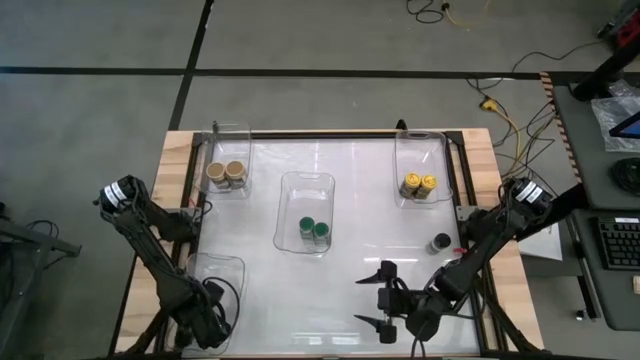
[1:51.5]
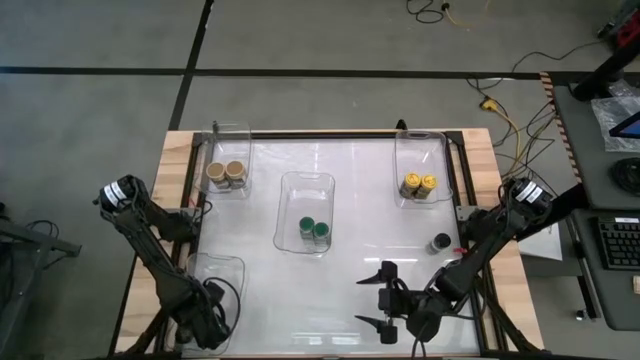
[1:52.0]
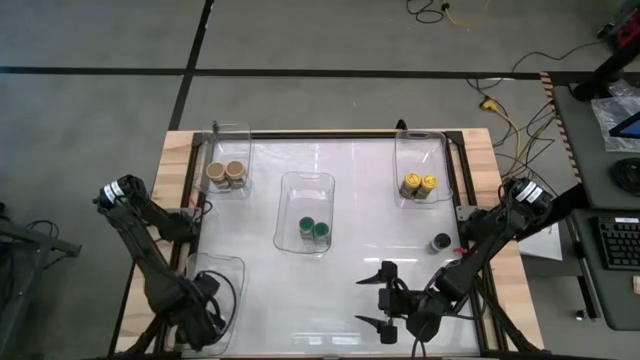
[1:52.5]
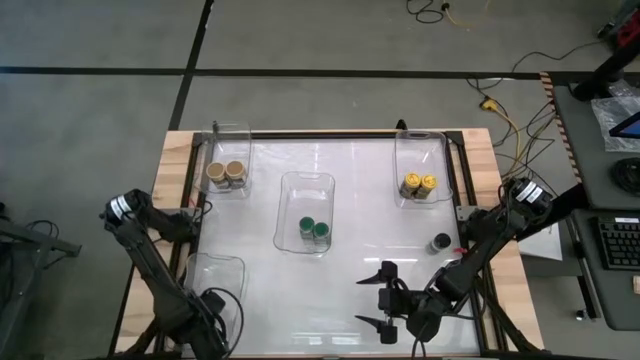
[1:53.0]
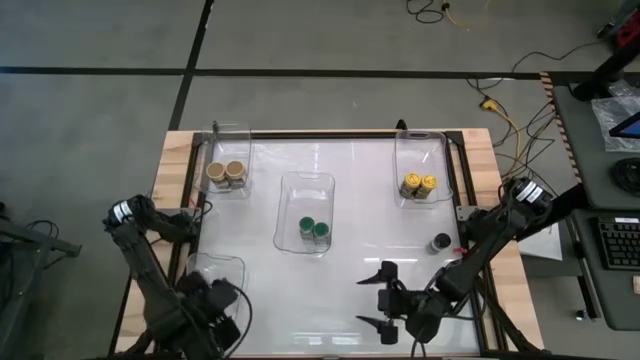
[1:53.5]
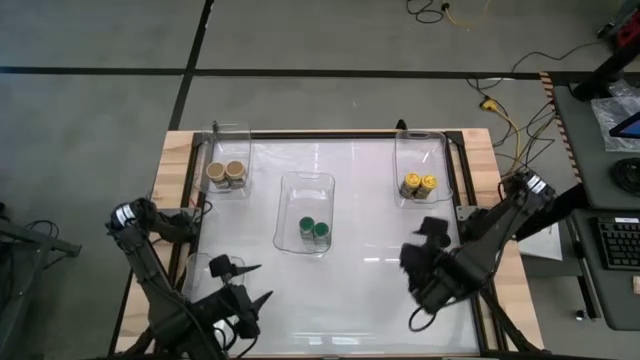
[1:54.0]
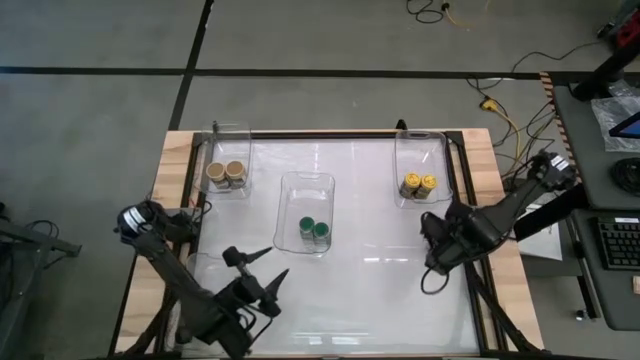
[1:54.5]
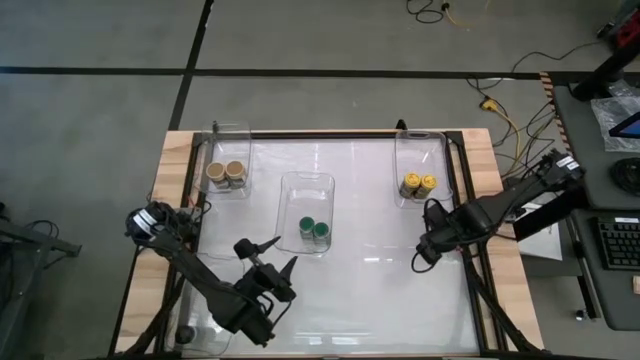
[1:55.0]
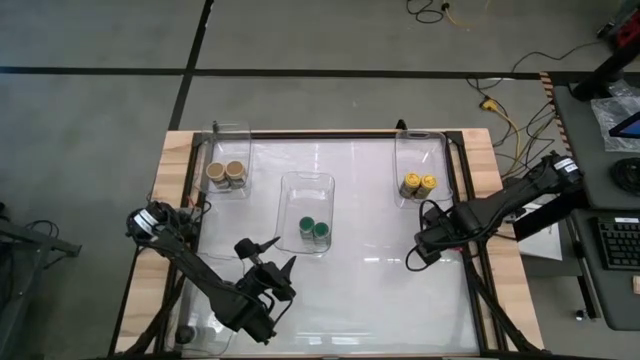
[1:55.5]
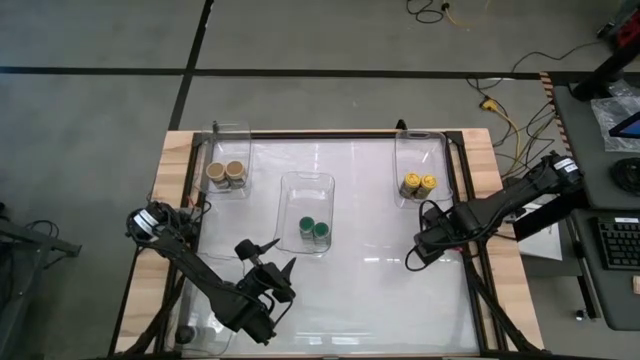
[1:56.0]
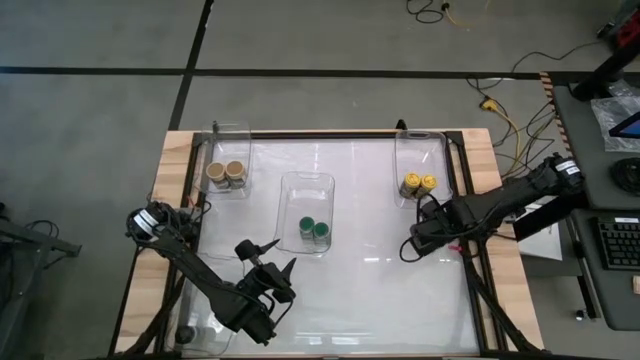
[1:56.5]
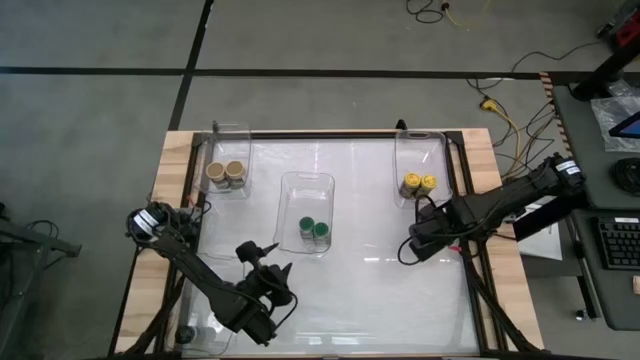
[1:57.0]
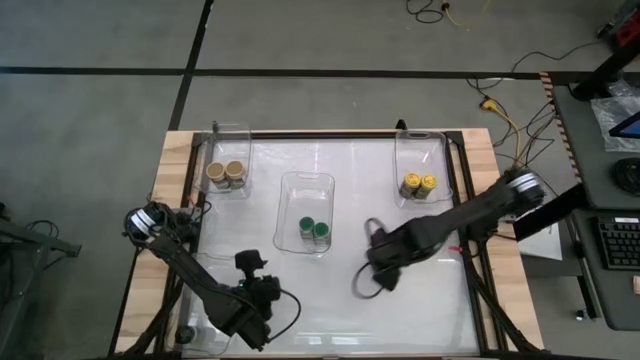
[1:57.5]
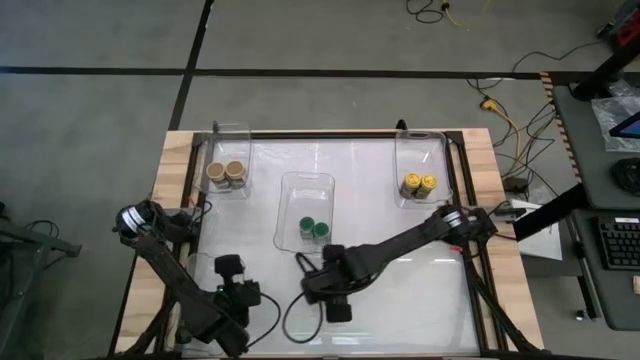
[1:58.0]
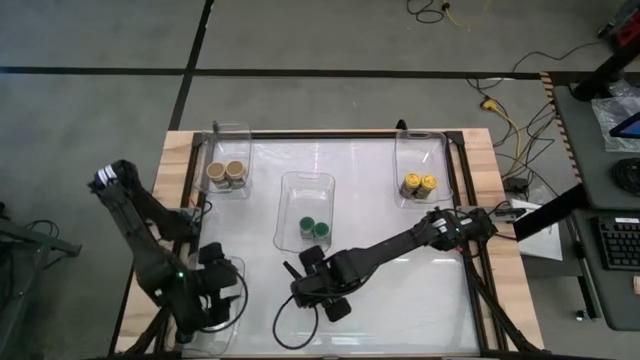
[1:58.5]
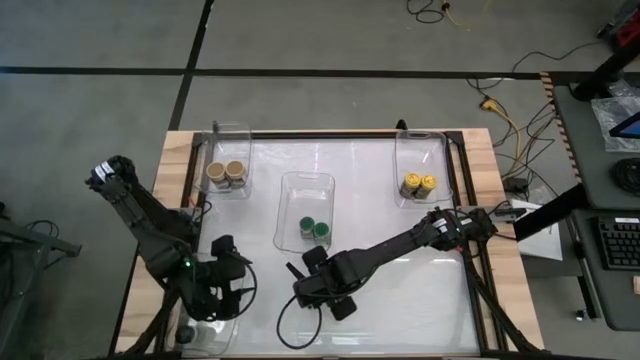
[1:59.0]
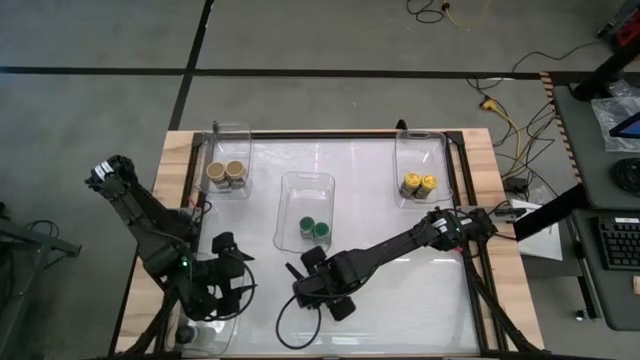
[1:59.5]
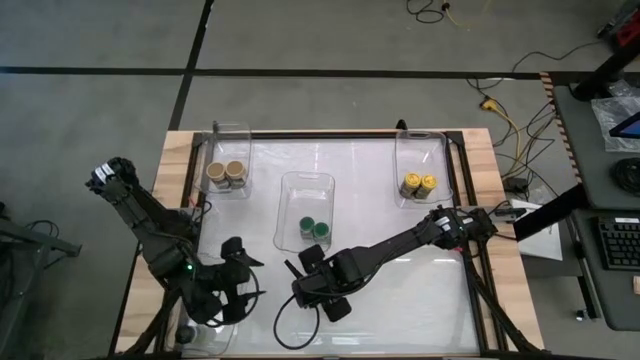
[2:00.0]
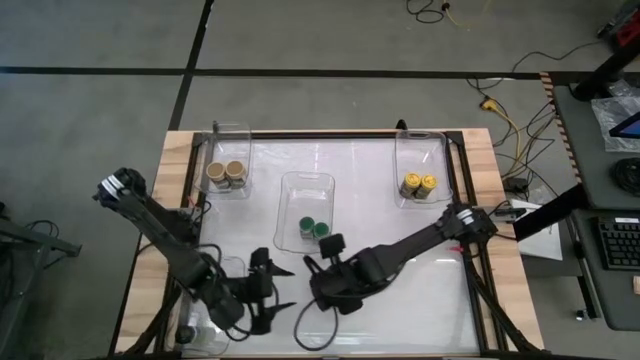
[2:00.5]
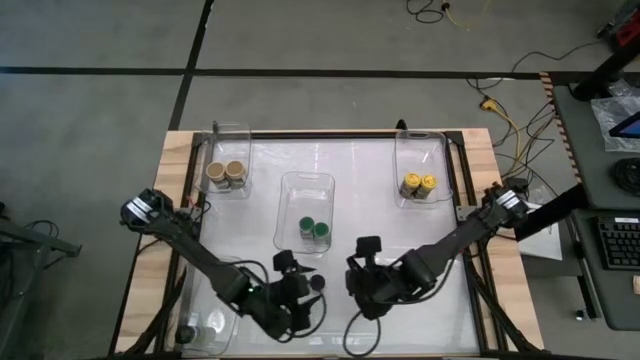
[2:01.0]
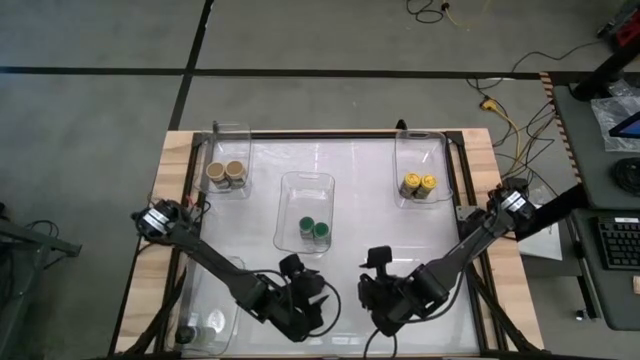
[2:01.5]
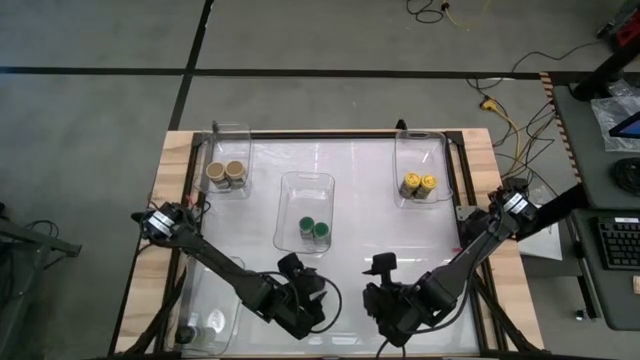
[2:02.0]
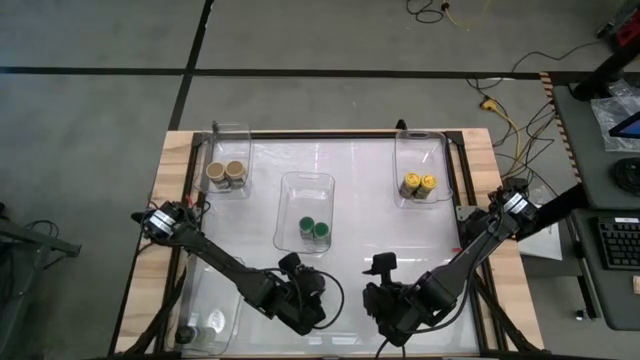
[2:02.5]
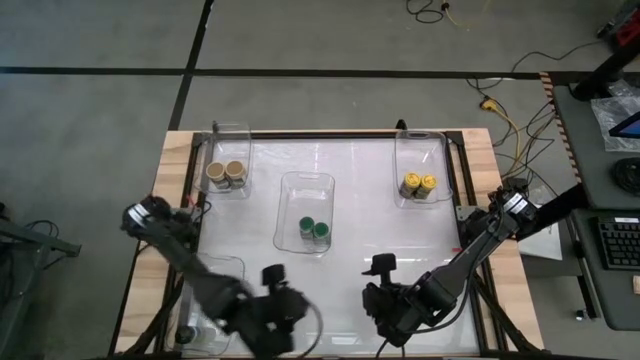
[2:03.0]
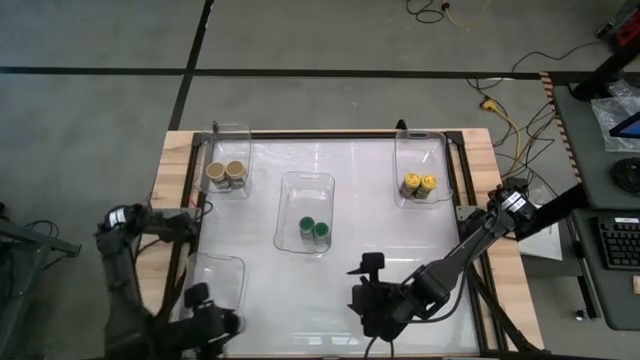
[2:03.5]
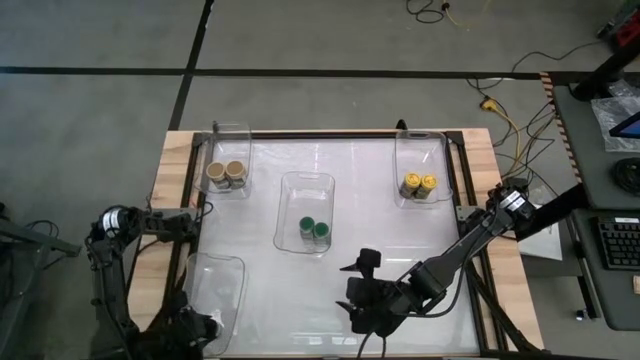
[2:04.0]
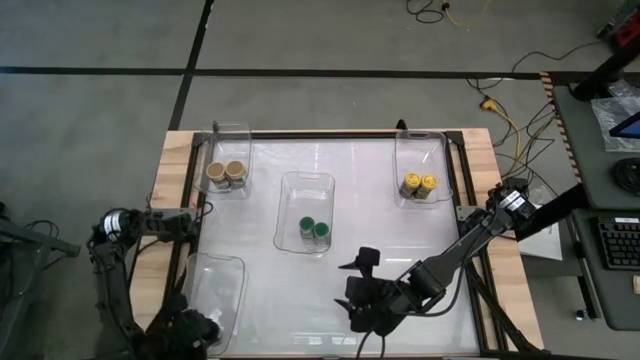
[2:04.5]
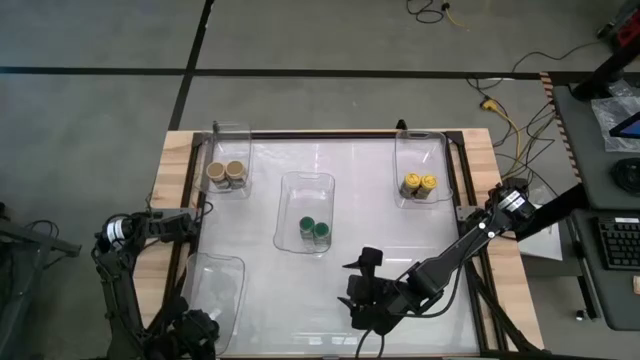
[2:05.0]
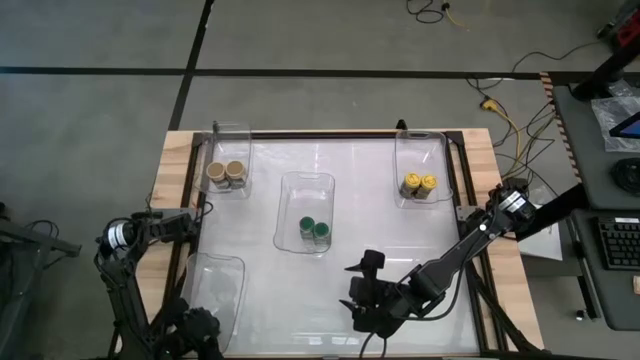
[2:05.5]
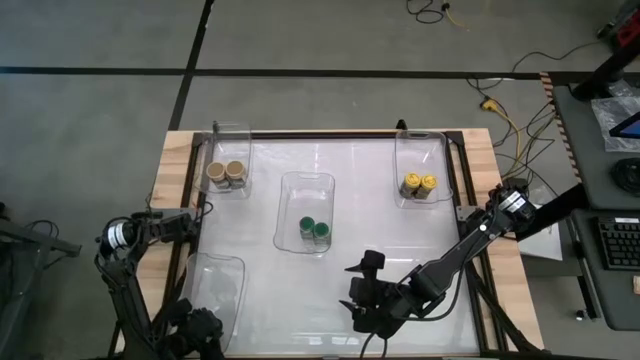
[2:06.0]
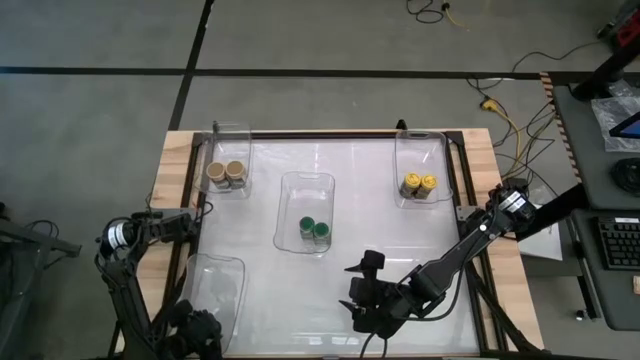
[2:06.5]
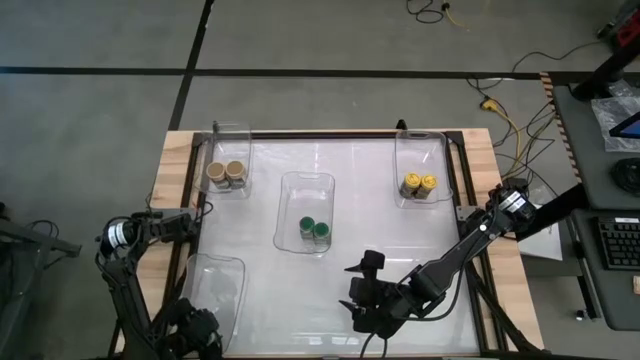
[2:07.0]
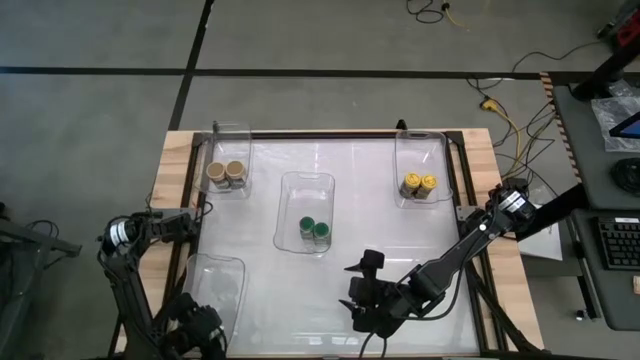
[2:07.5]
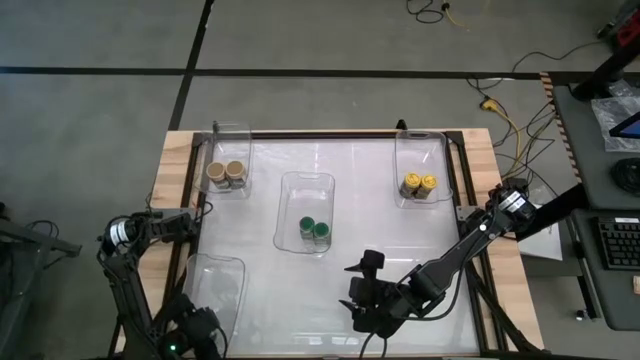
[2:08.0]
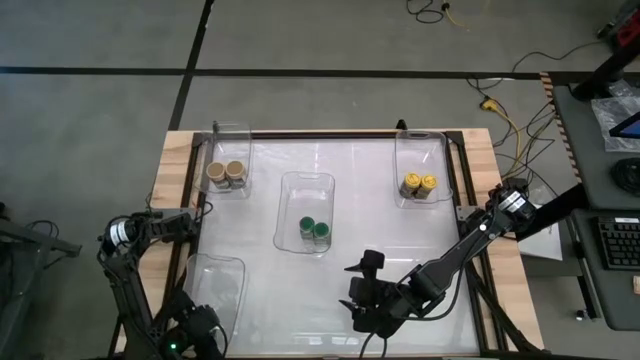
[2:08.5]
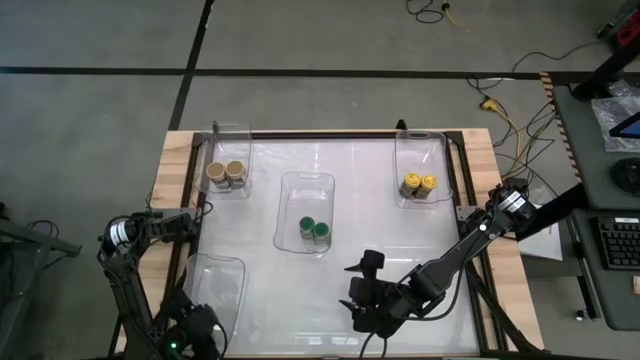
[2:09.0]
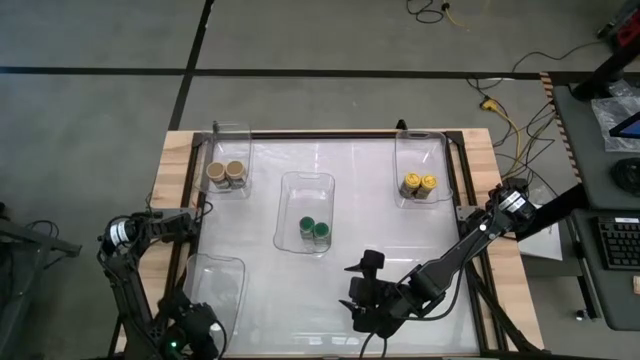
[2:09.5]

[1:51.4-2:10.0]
Task: Sort spices by type
Put the black seasoning bottle into the bottom left transparent bin

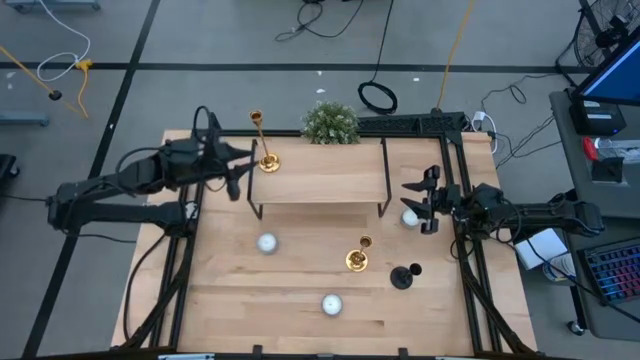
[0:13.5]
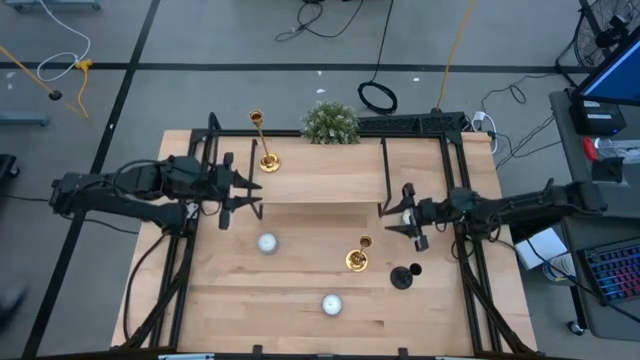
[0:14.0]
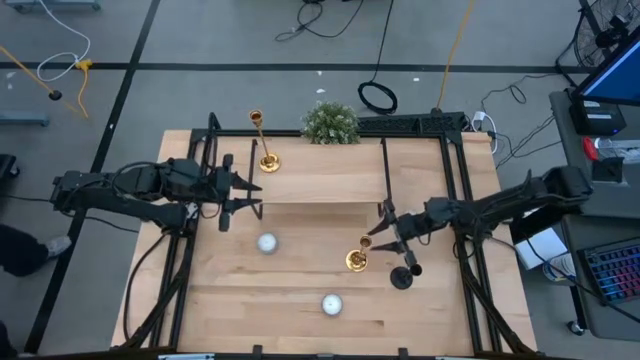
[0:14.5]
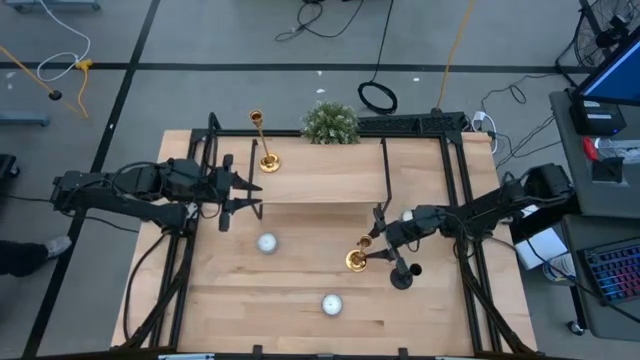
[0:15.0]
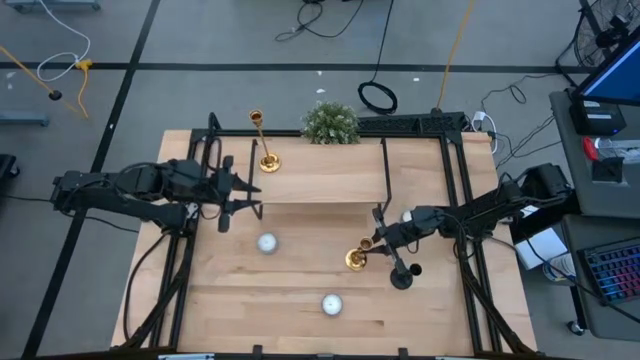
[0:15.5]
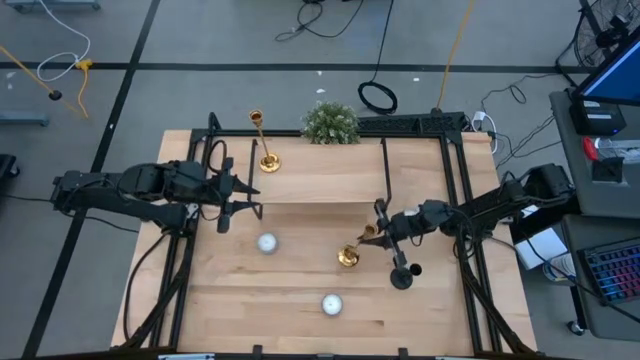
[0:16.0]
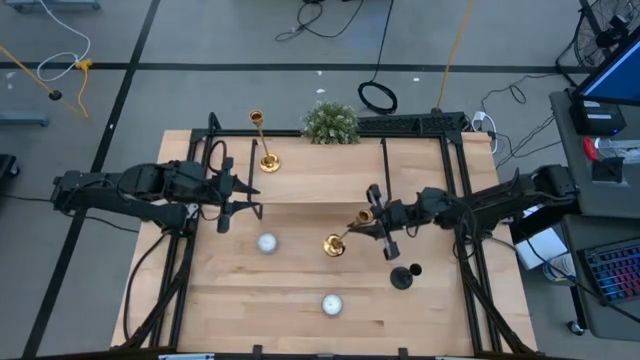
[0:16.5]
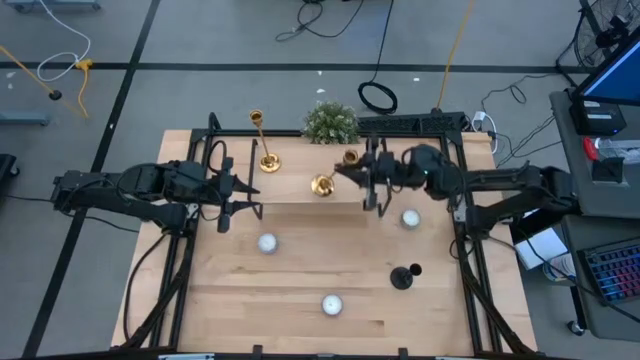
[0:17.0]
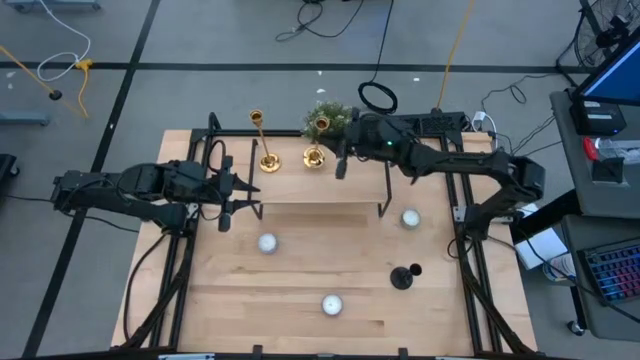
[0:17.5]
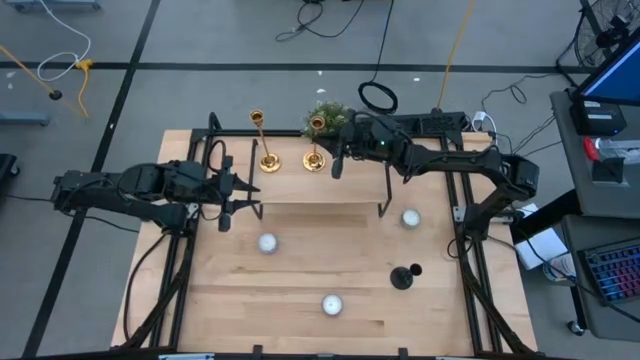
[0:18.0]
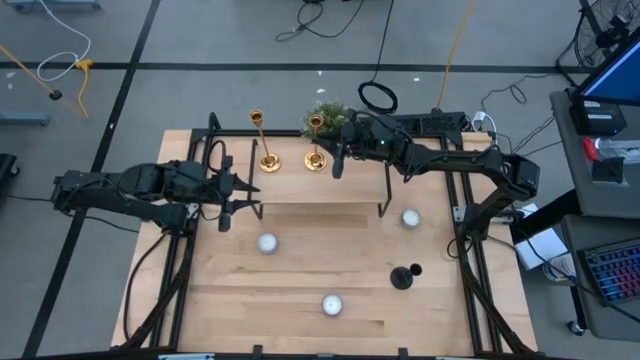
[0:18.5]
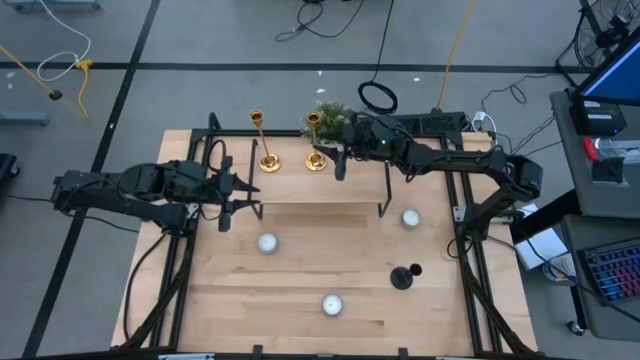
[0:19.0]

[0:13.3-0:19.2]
Task: Pick & Place candle stick holders
Align the gold candle holder with the gold candle holder on the shelf
